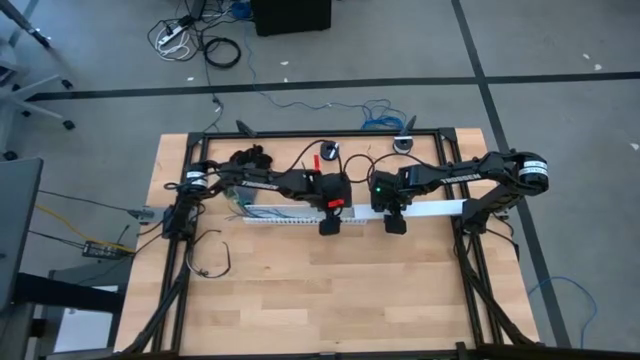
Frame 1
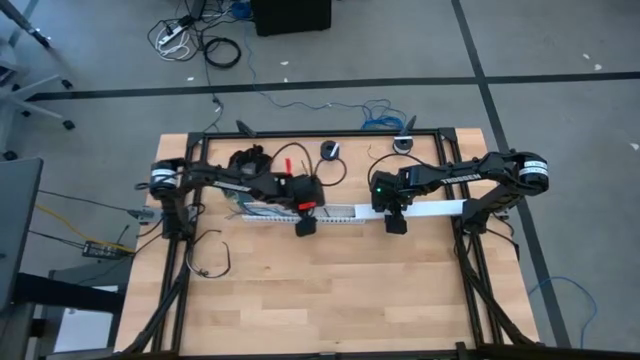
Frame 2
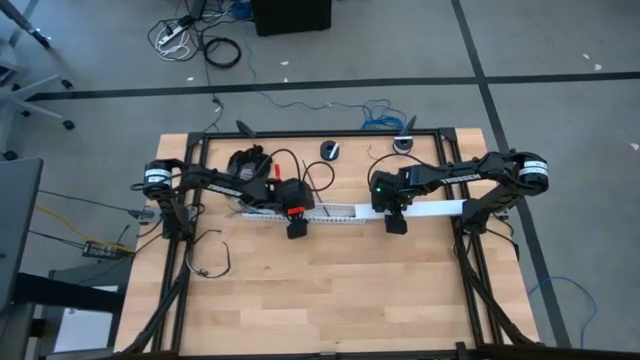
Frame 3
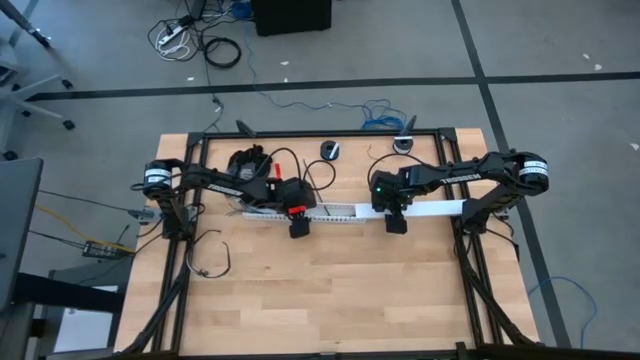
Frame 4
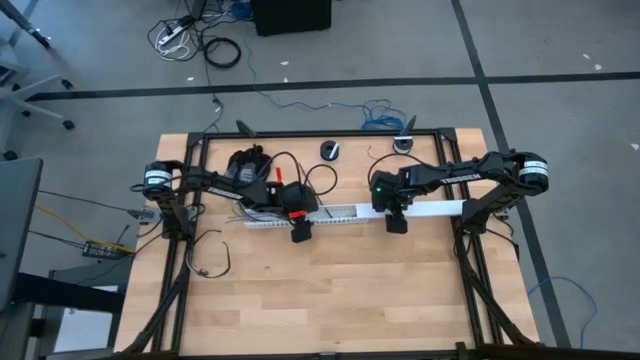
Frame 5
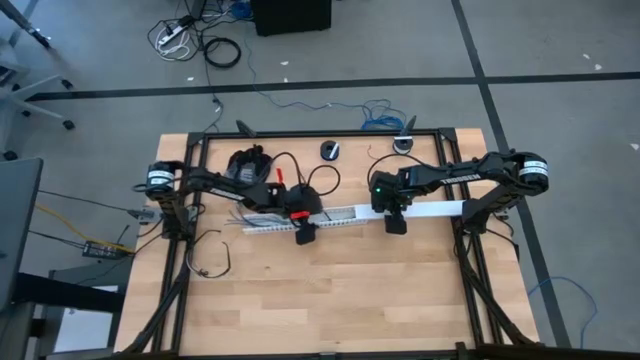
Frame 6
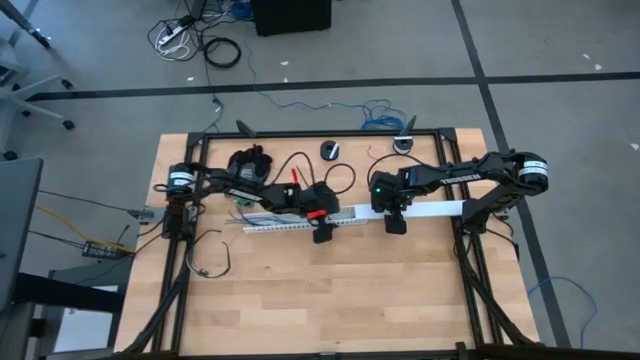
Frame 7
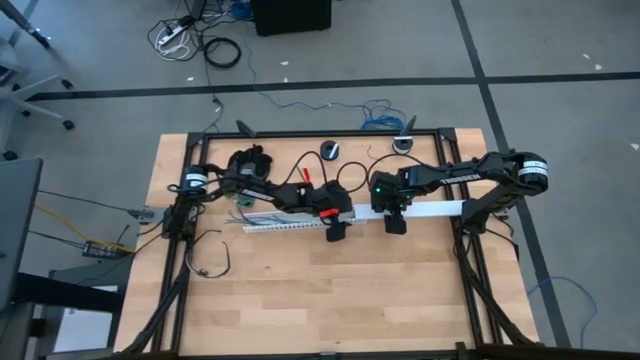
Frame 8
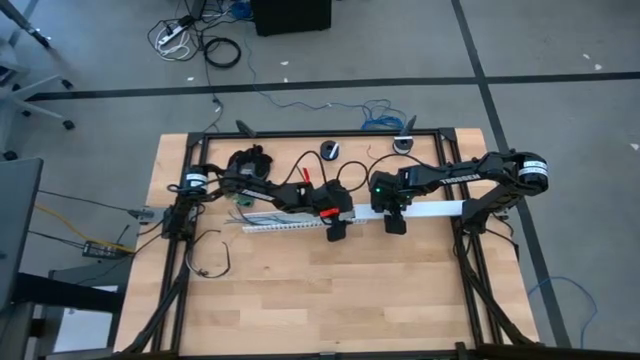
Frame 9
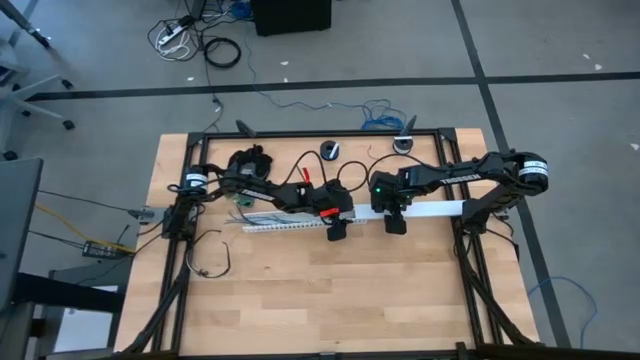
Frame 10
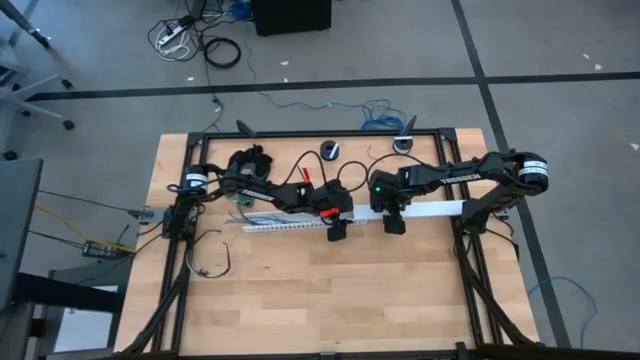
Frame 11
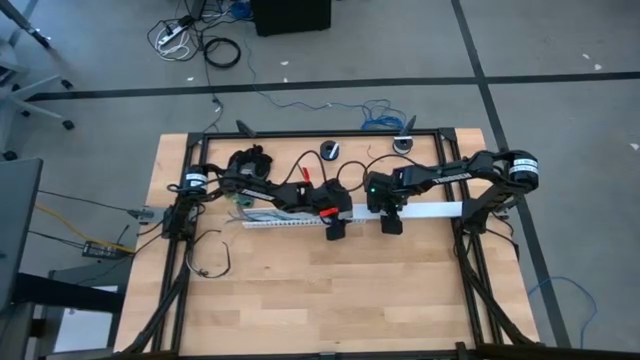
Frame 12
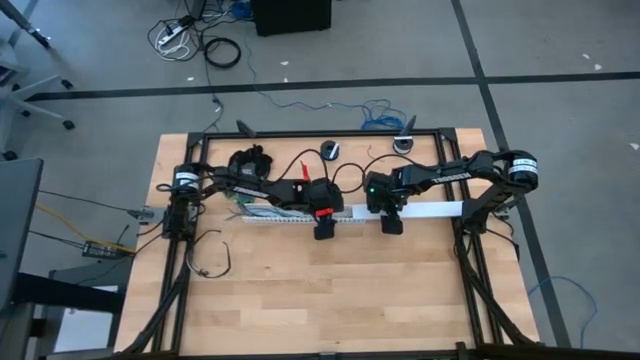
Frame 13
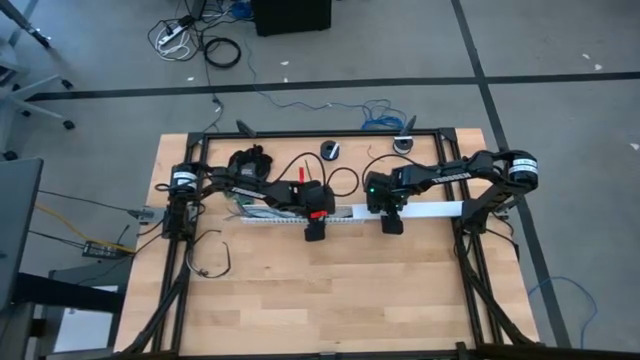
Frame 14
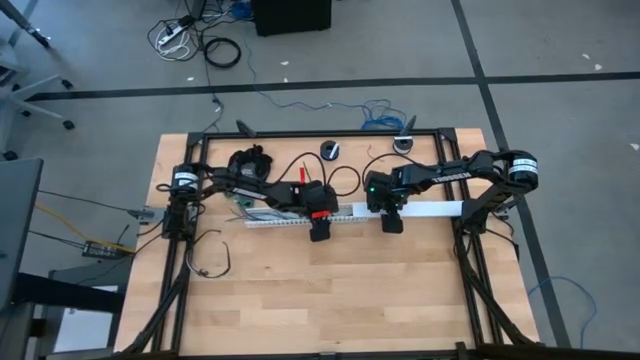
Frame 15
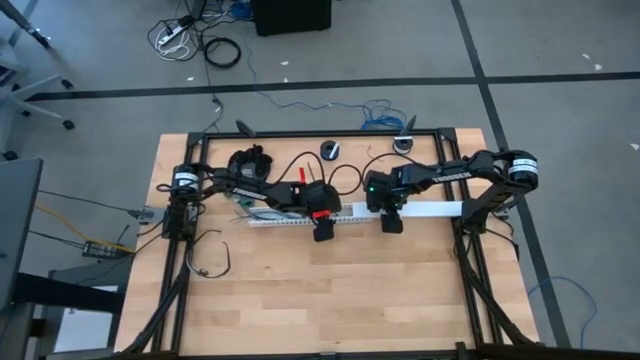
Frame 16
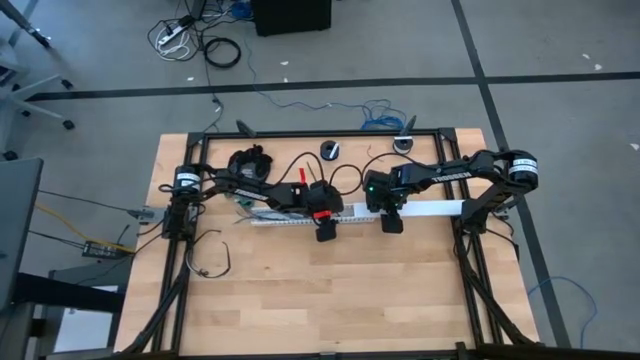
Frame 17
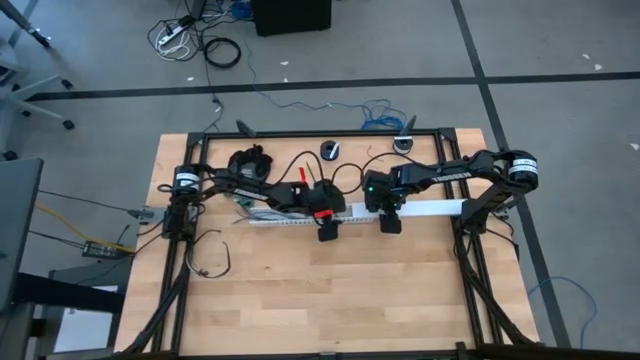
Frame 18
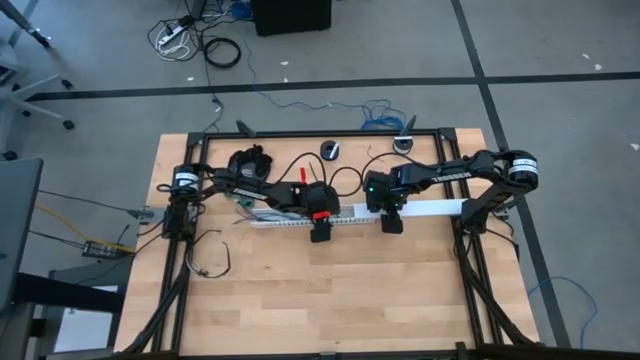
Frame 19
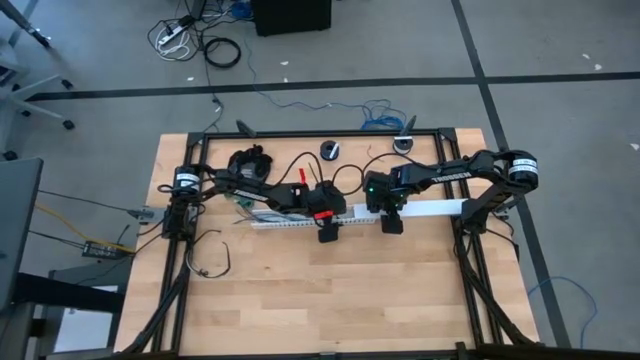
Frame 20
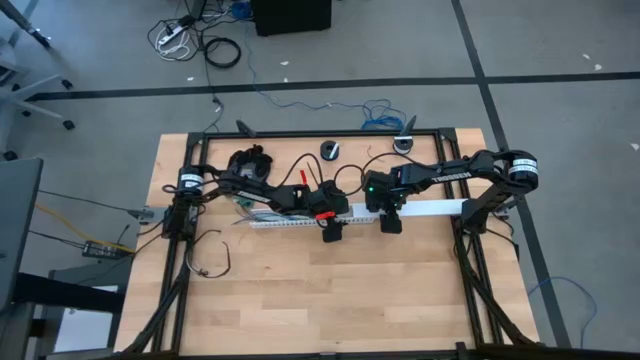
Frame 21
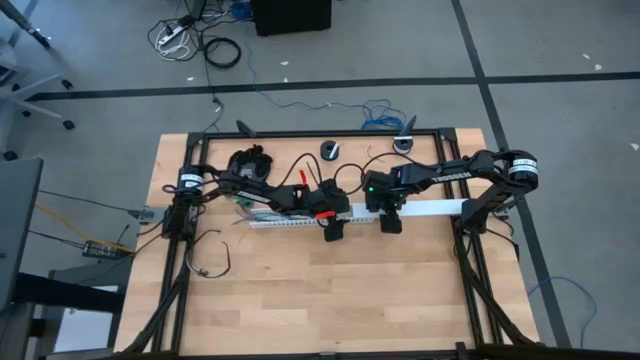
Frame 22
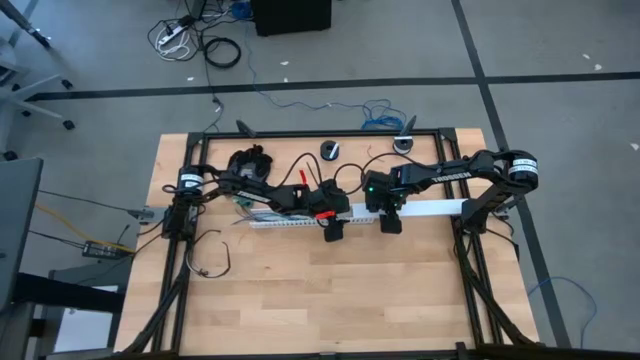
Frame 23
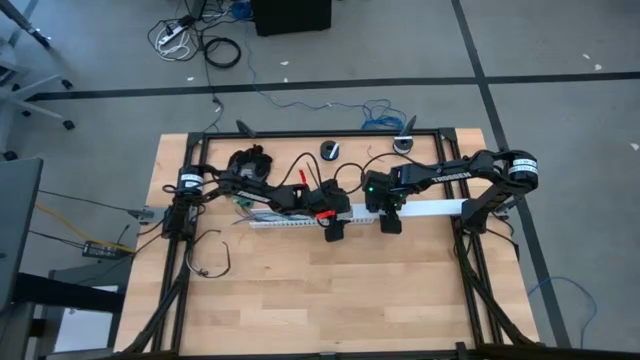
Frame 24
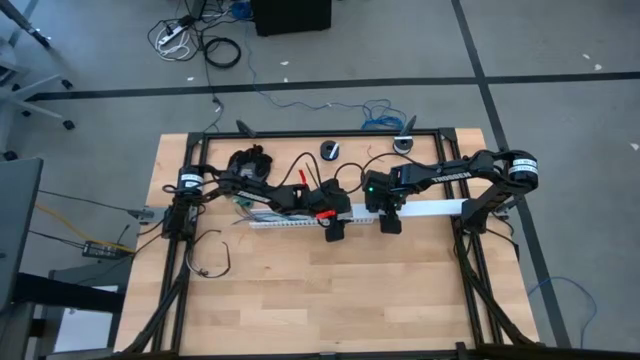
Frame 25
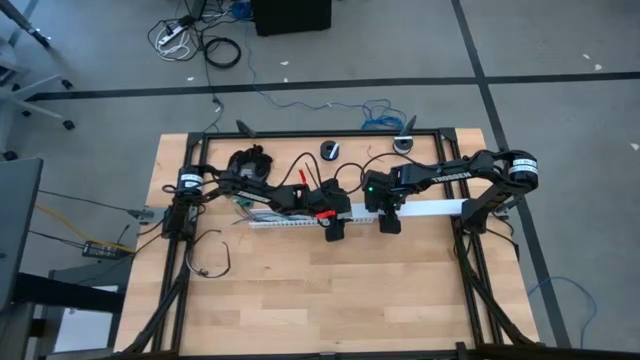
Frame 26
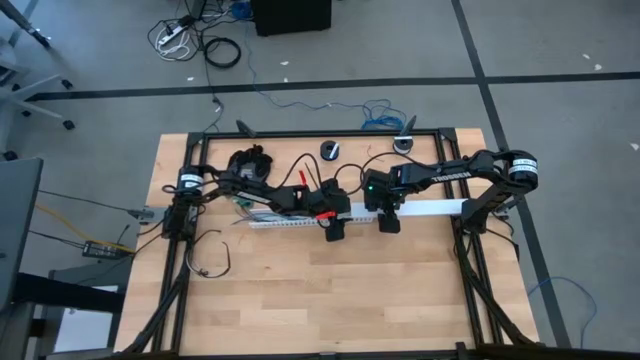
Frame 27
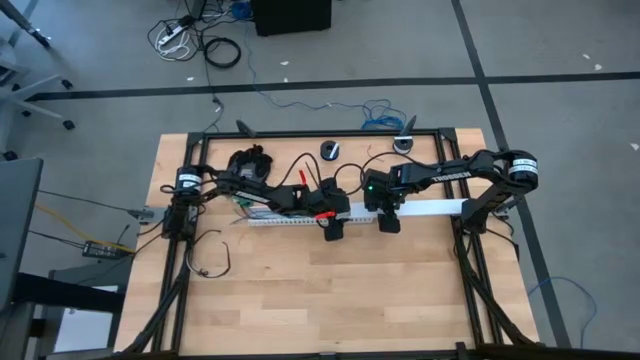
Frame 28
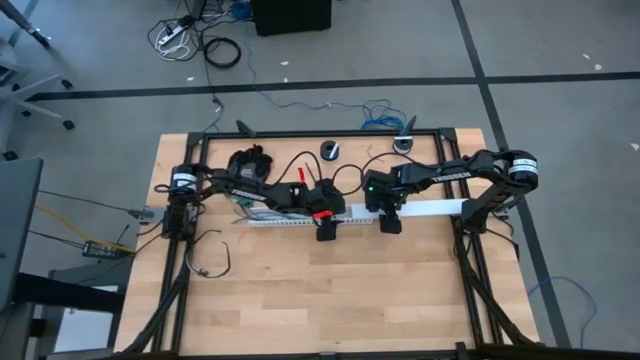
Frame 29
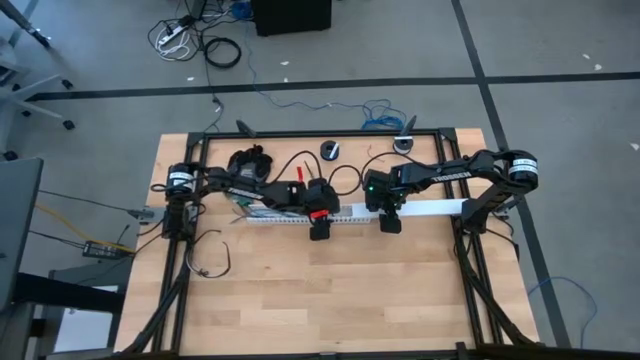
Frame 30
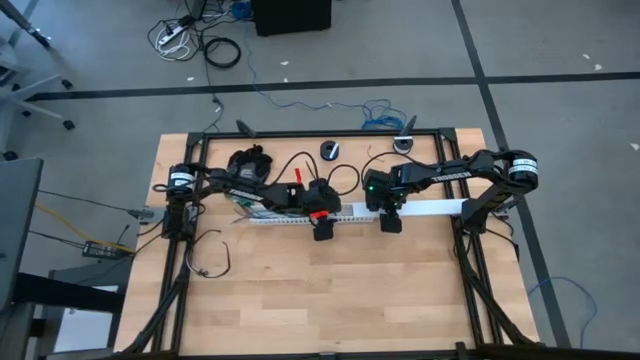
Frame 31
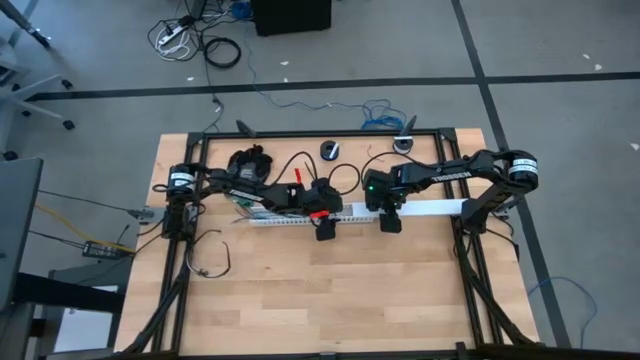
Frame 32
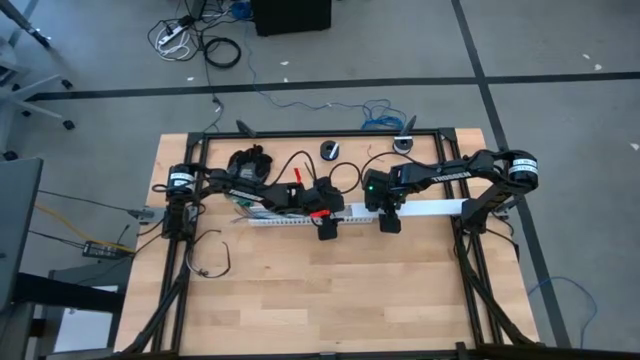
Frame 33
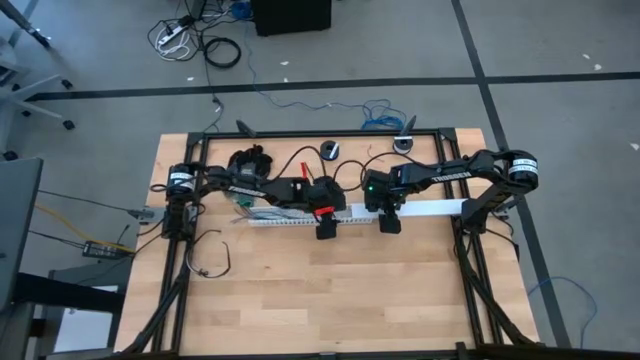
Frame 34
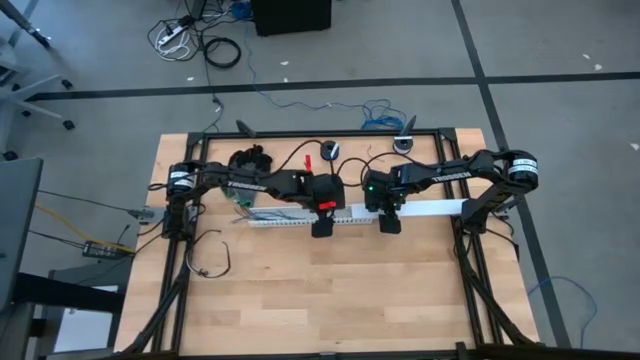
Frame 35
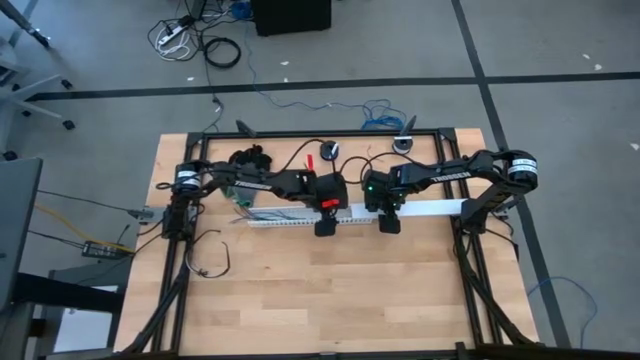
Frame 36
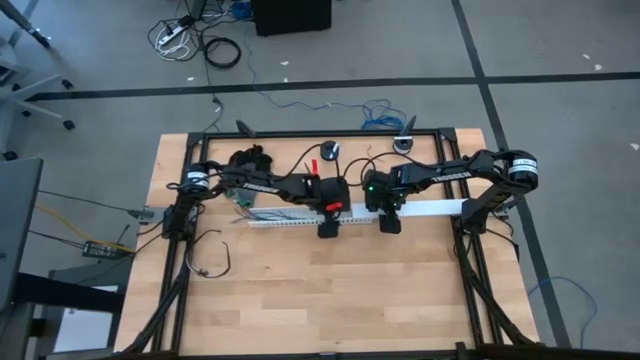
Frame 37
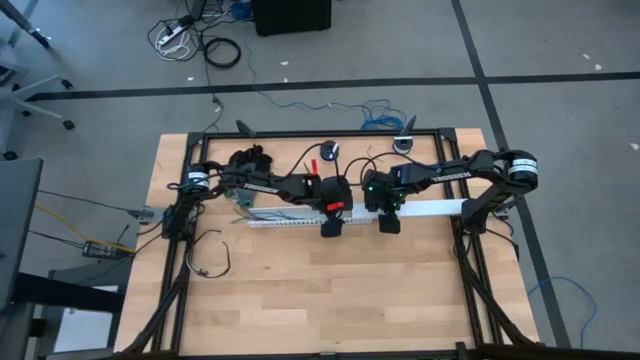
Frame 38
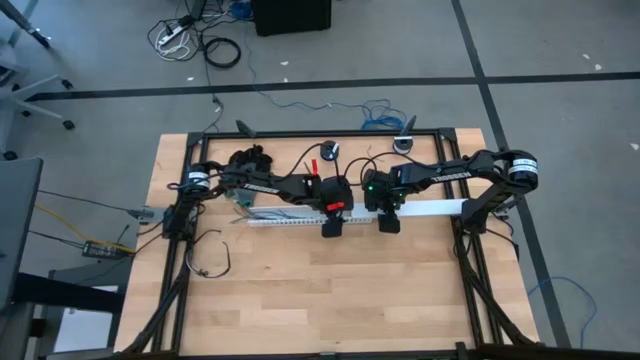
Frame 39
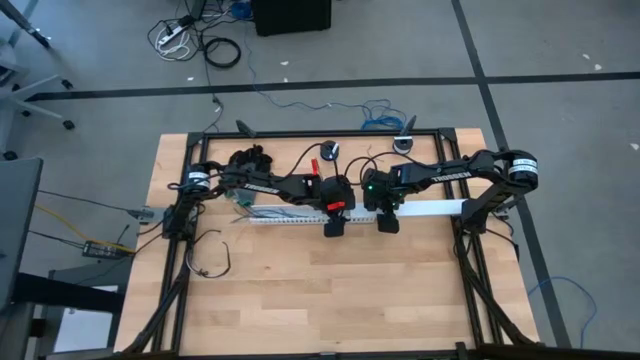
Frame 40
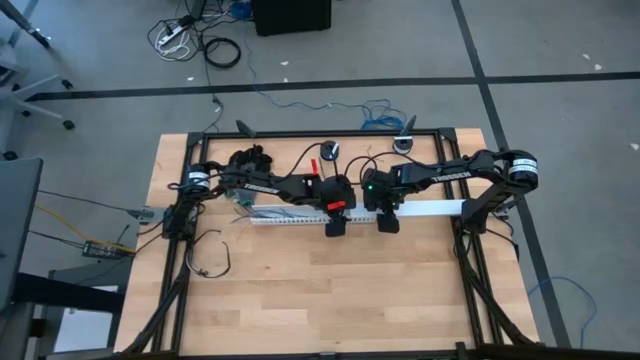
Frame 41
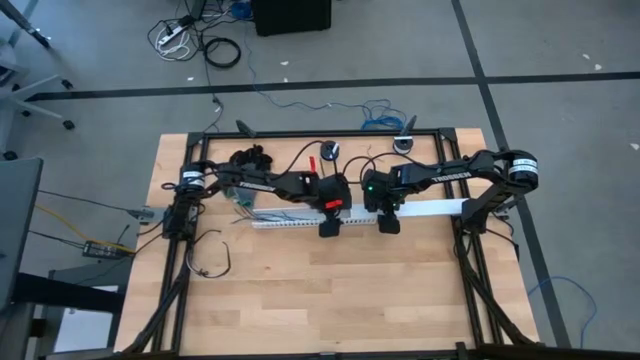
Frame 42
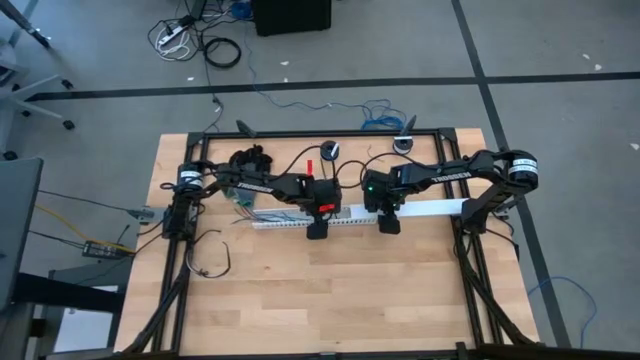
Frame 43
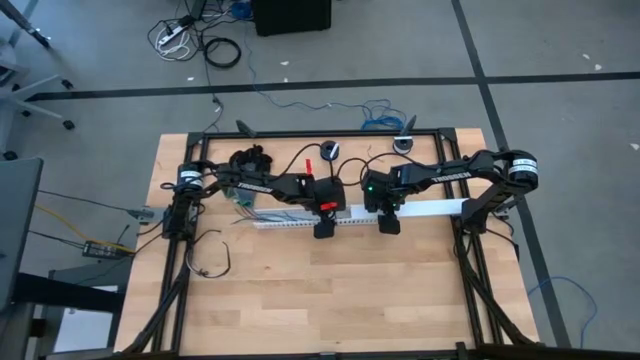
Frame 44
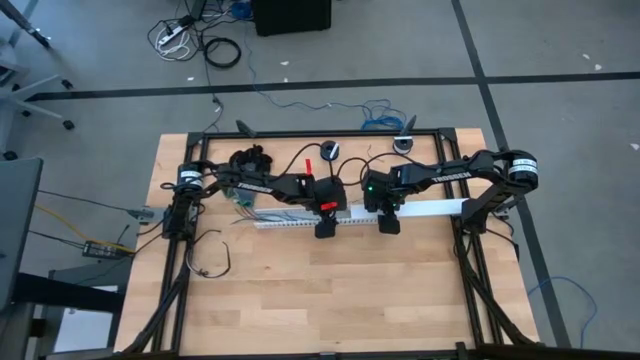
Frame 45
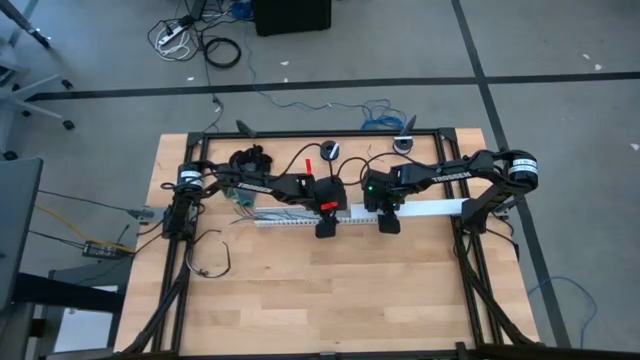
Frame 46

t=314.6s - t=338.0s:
Task: Ziptie cables
Close the white cable duct
